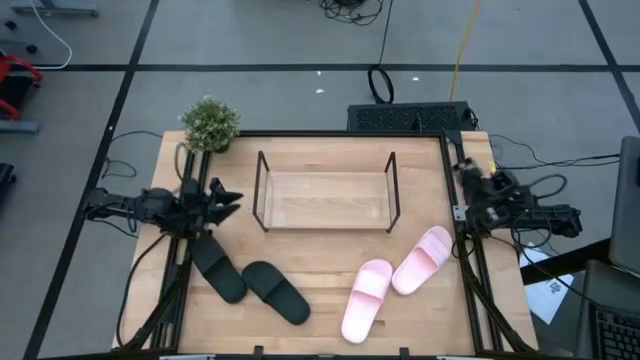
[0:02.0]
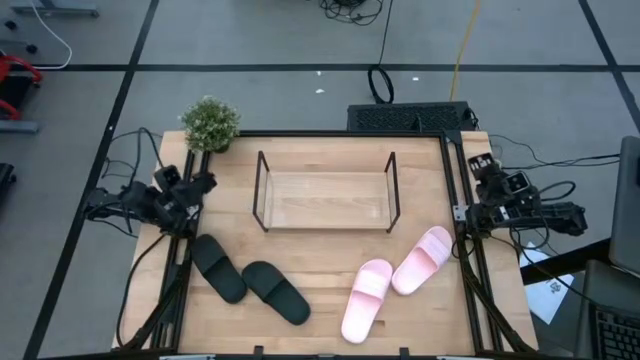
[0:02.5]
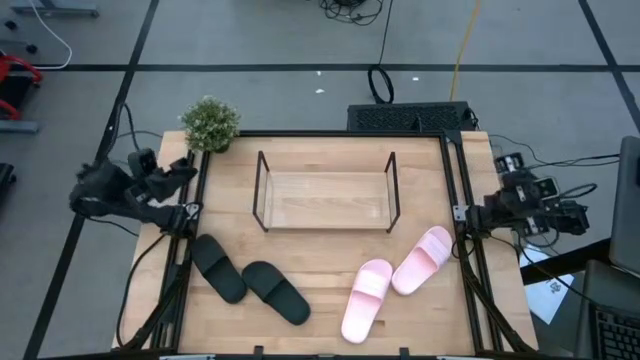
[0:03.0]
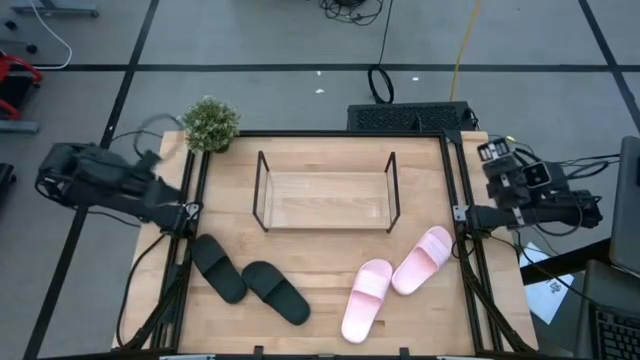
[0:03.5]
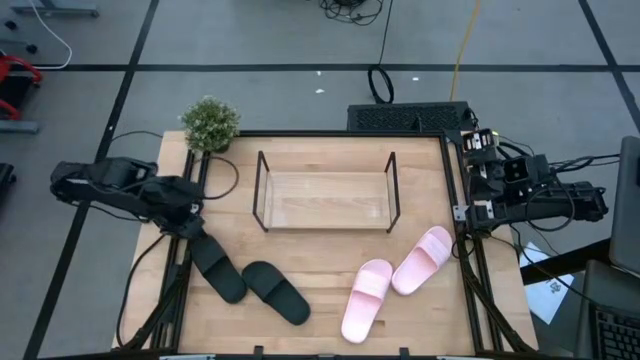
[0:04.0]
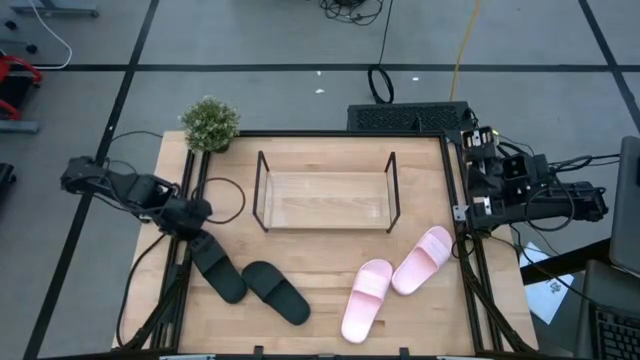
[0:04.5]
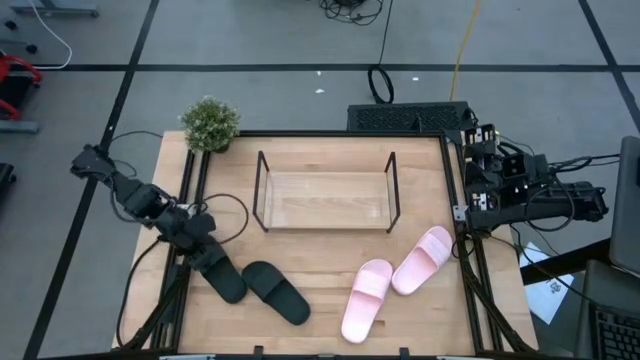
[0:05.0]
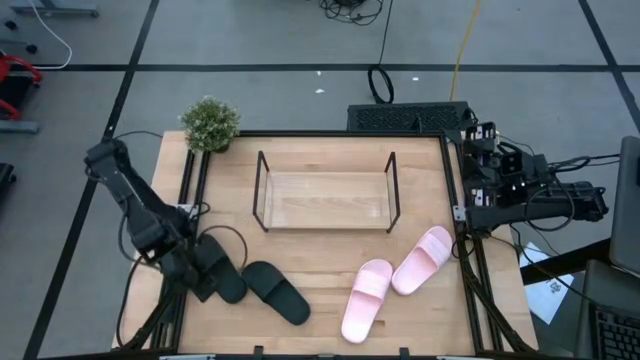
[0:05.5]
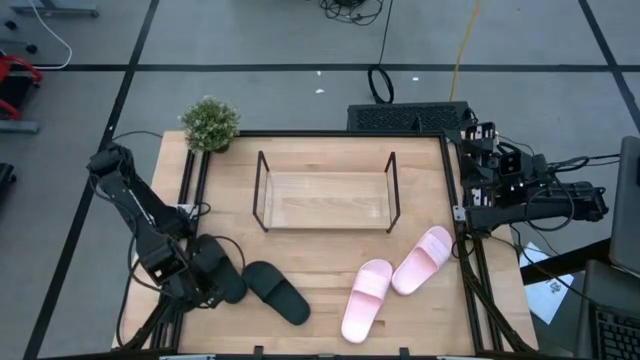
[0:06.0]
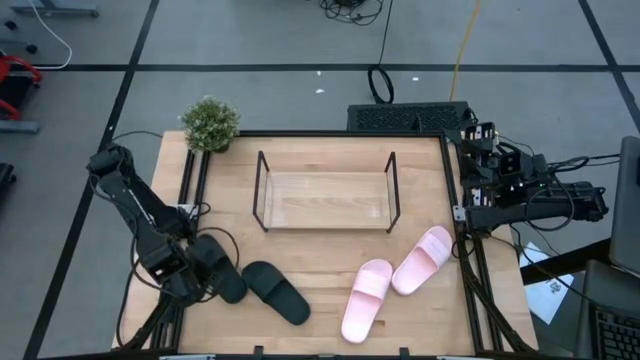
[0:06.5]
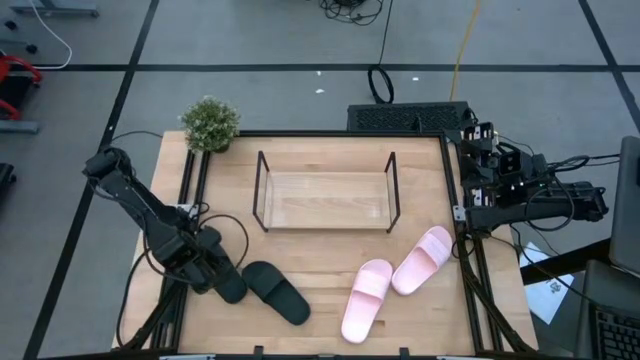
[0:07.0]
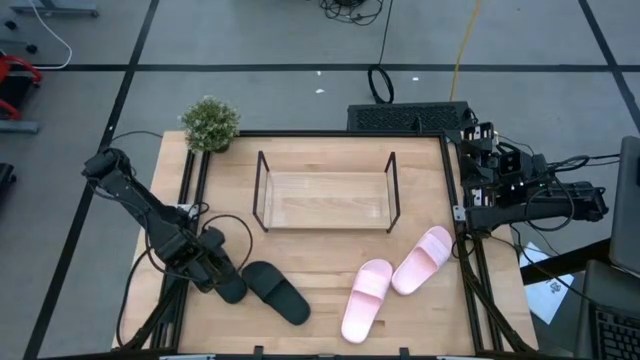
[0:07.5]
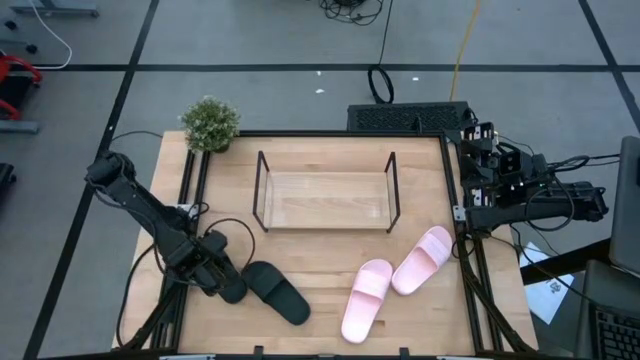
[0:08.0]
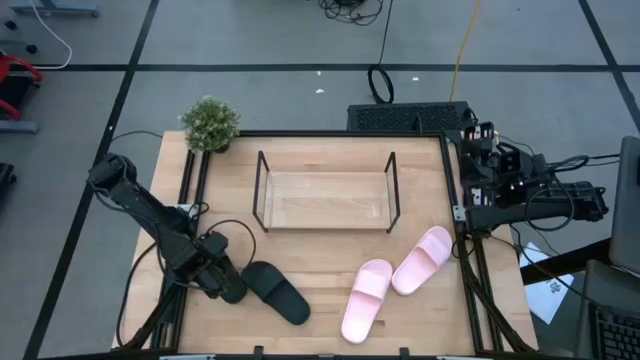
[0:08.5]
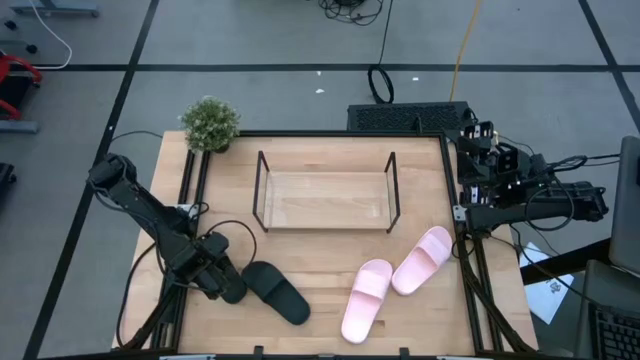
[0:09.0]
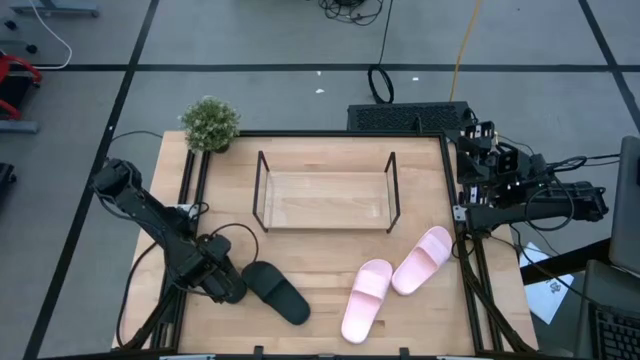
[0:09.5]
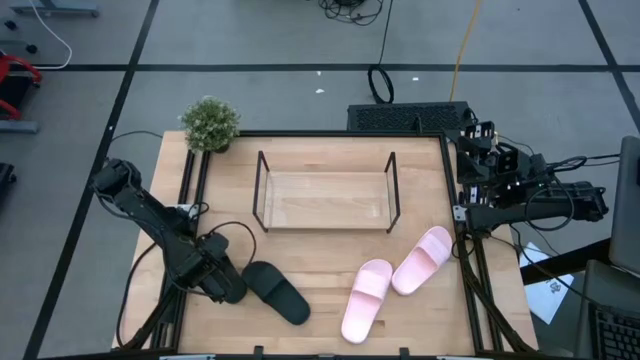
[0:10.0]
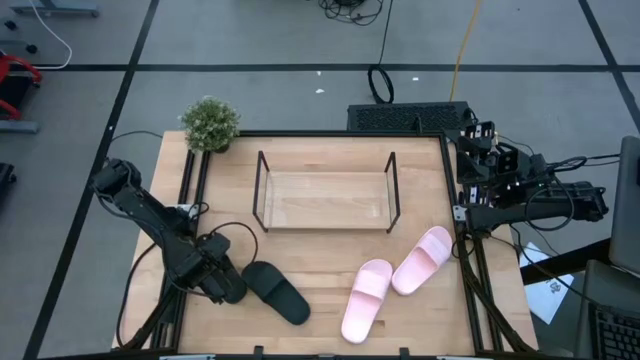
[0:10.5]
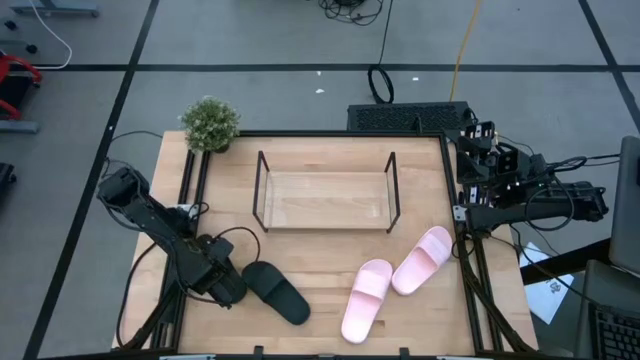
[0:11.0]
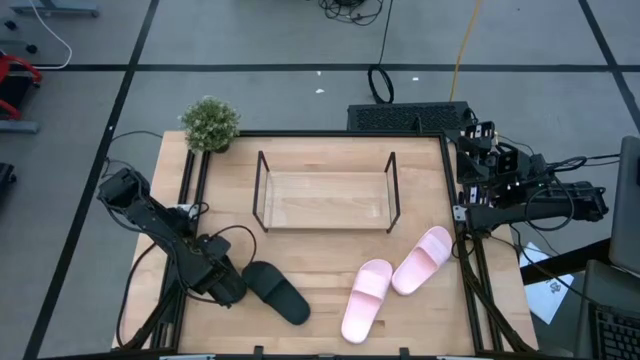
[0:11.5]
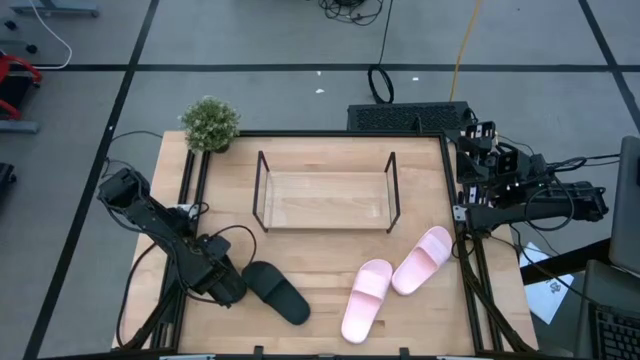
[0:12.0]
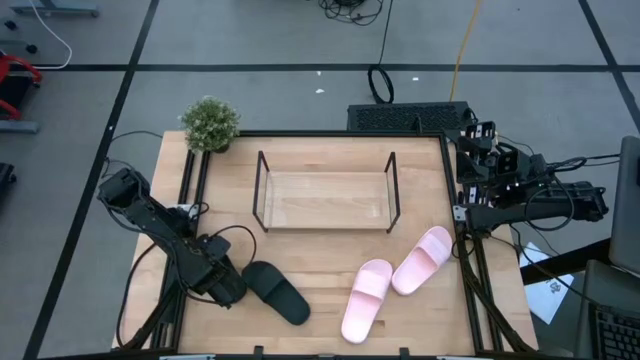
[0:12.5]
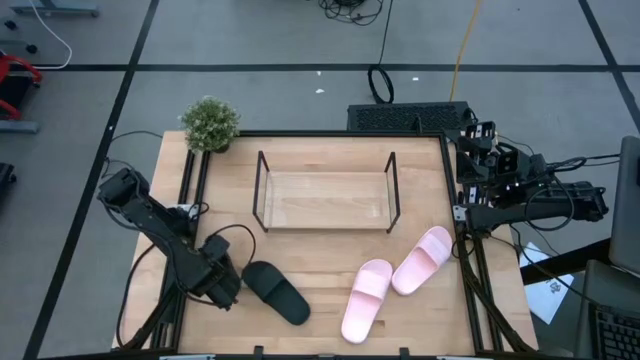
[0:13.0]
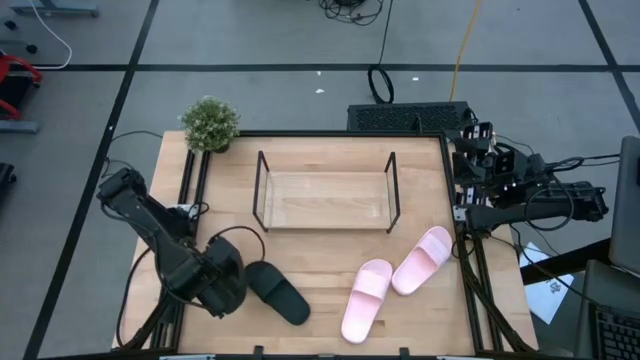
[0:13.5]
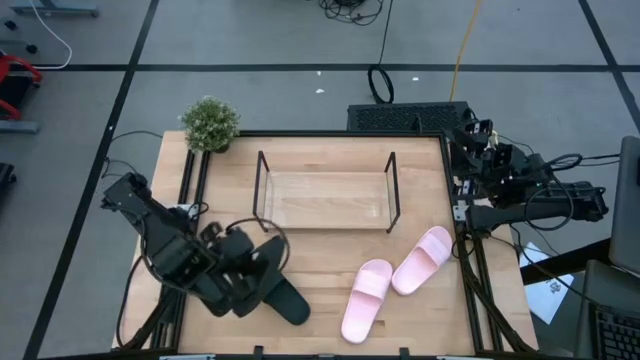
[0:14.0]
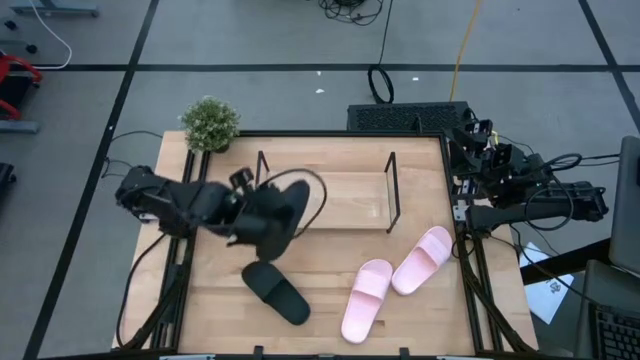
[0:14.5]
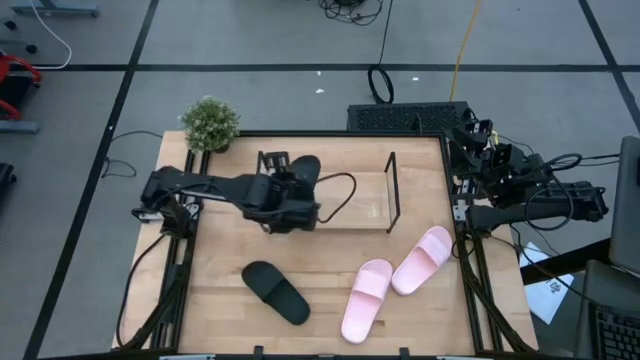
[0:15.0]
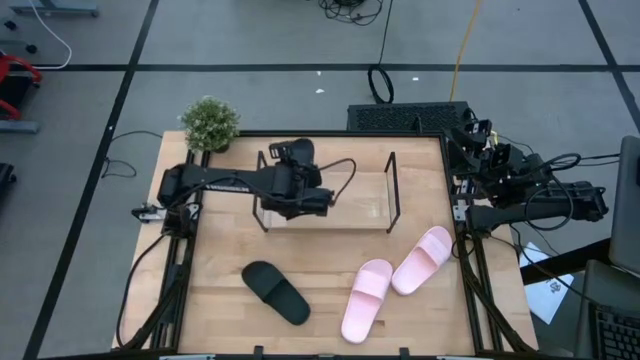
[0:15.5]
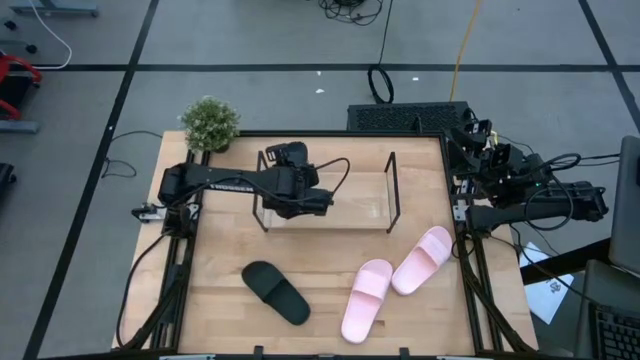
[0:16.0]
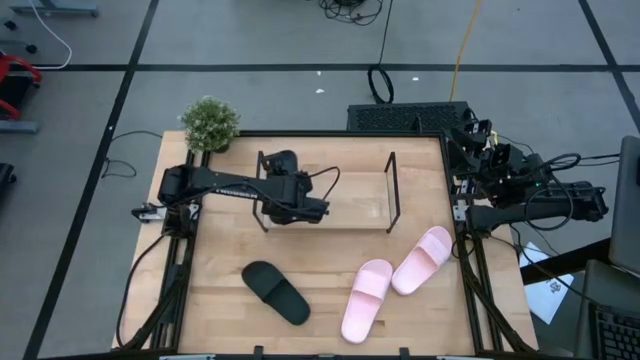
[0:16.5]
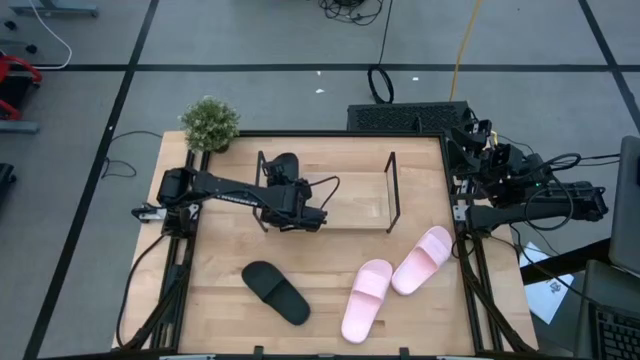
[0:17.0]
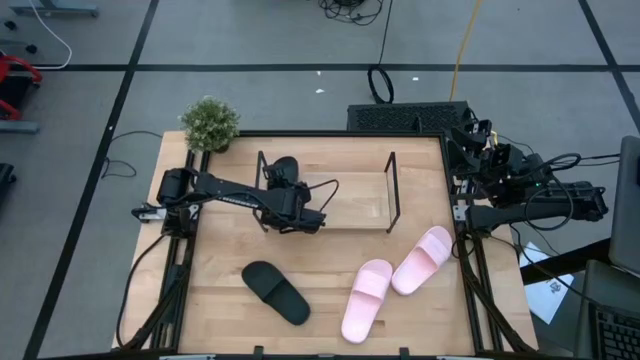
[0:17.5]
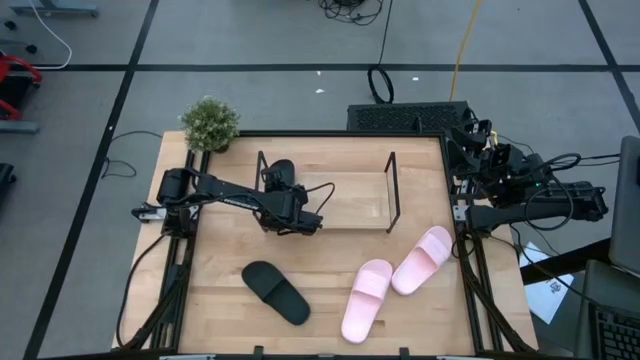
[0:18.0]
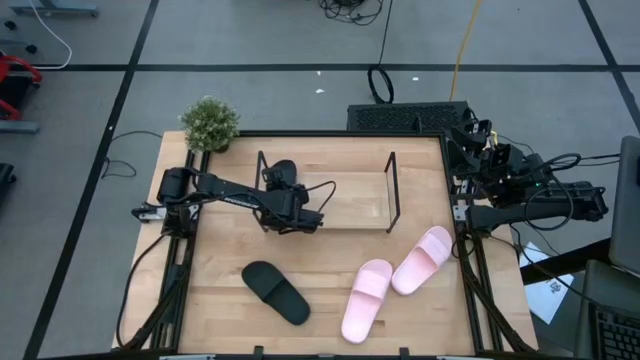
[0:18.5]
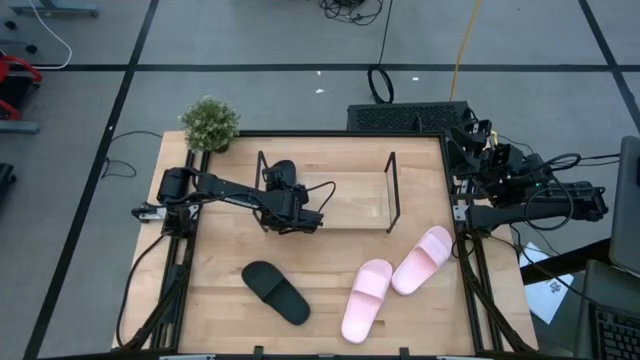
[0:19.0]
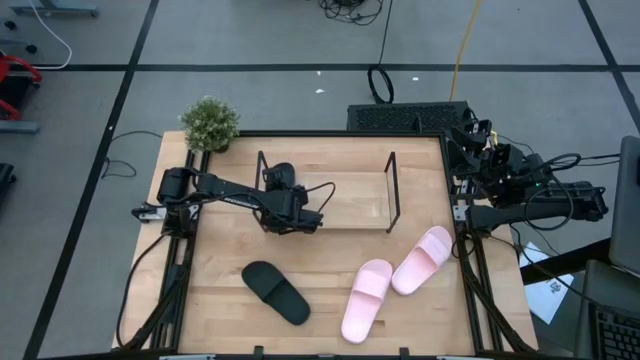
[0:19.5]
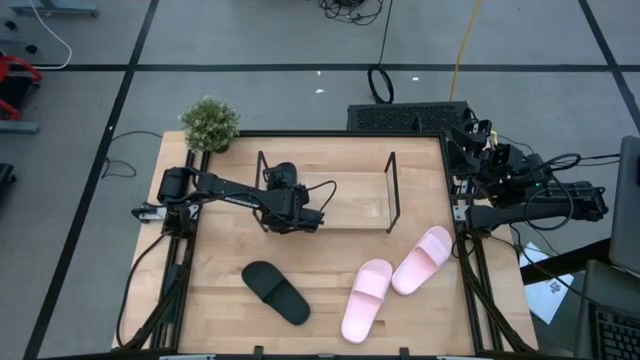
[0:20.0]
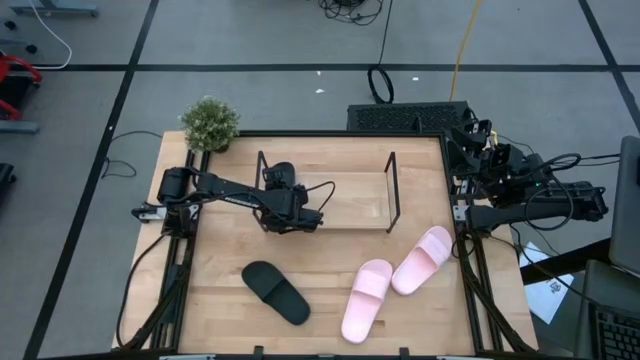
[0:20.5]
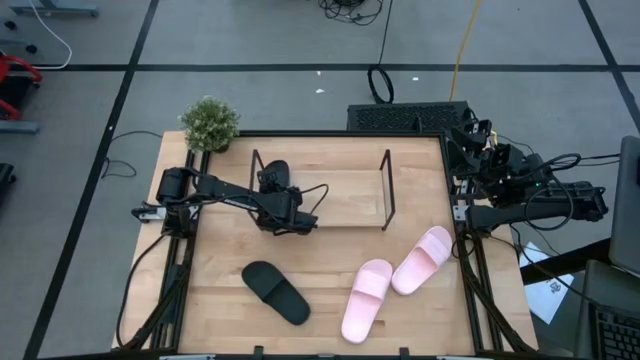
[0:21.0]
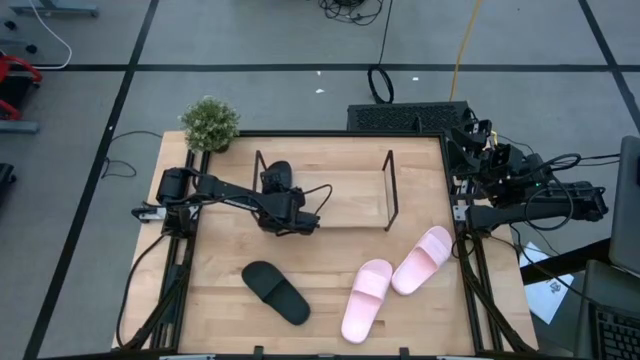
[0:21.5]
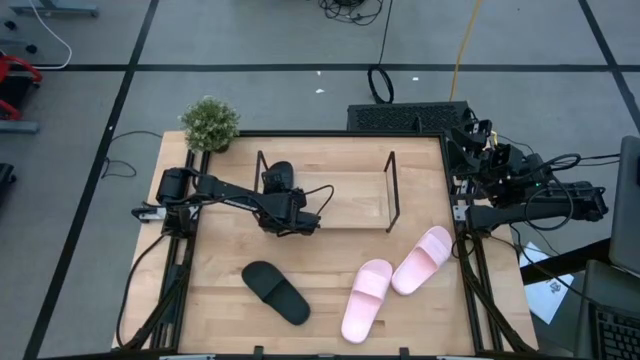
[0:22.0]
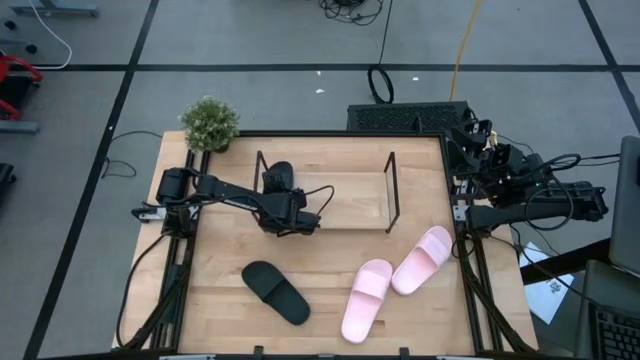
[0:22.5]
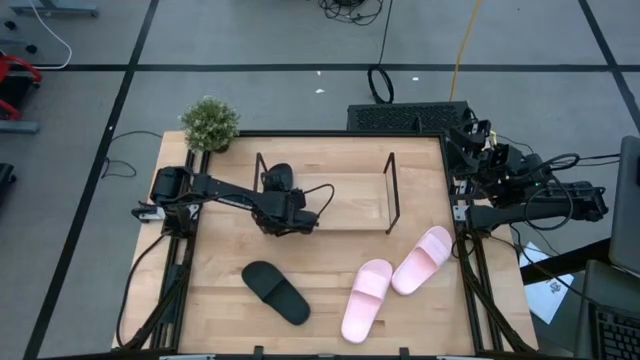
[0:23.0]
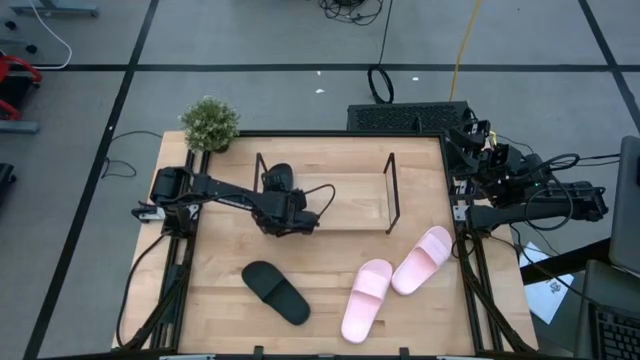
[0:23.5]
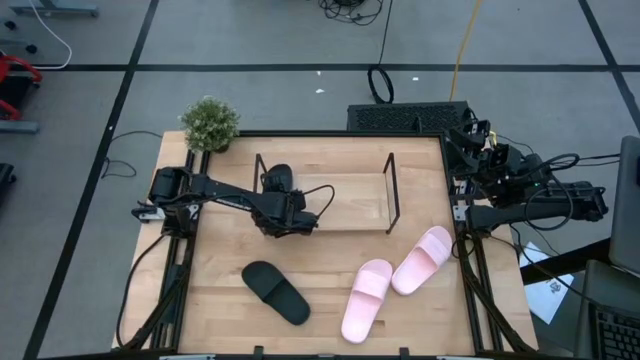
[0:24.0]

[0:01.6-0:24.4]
Task: Pick and place slides into the shelf
Put the left black slipper on the shelf
